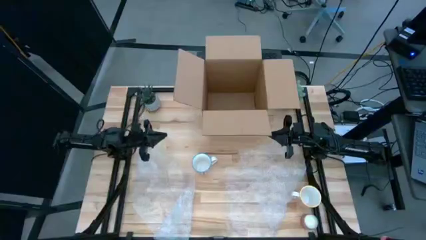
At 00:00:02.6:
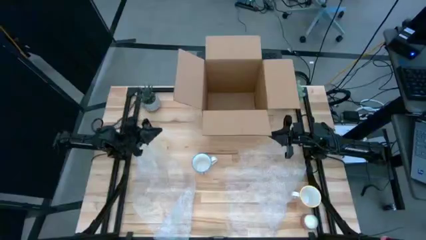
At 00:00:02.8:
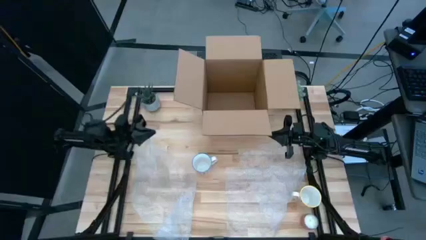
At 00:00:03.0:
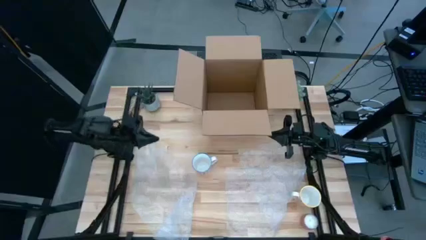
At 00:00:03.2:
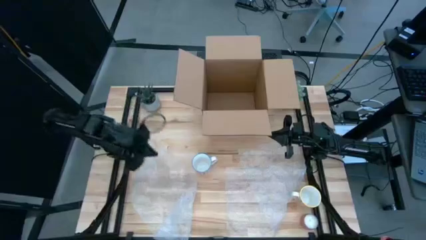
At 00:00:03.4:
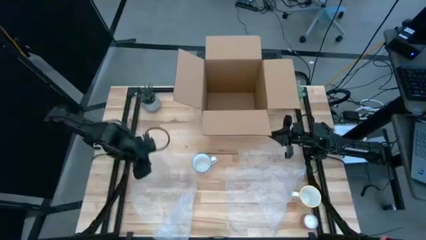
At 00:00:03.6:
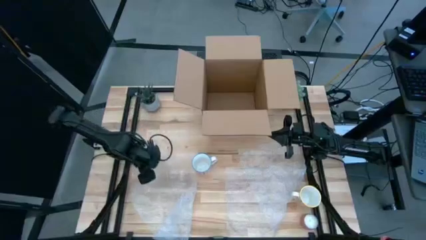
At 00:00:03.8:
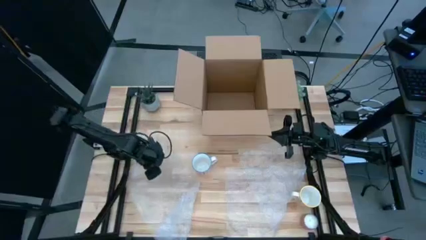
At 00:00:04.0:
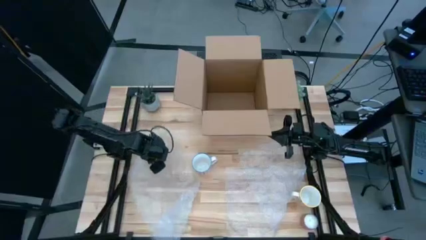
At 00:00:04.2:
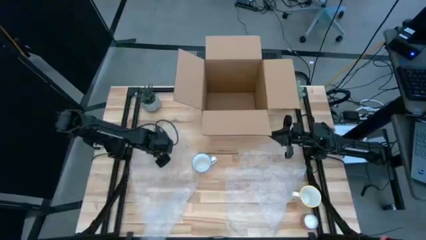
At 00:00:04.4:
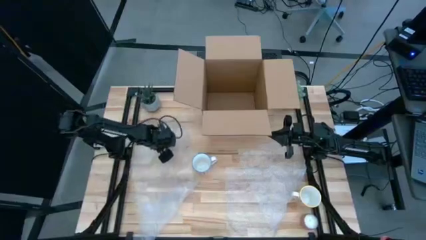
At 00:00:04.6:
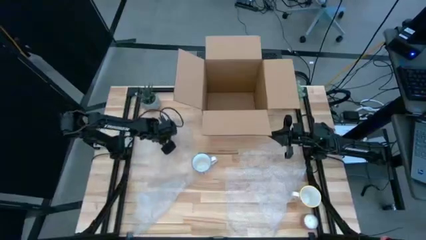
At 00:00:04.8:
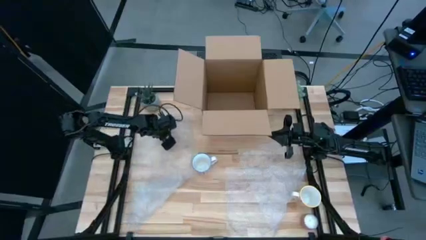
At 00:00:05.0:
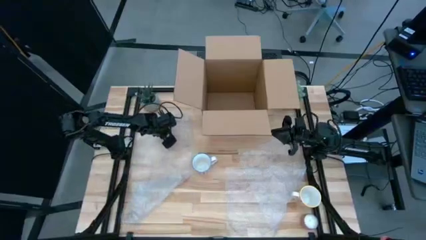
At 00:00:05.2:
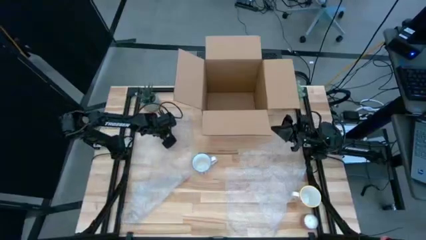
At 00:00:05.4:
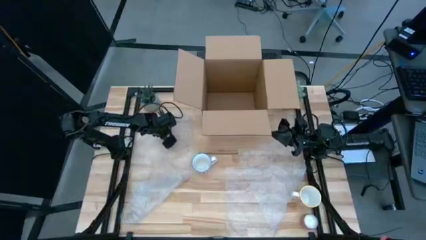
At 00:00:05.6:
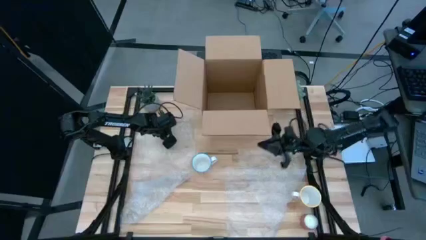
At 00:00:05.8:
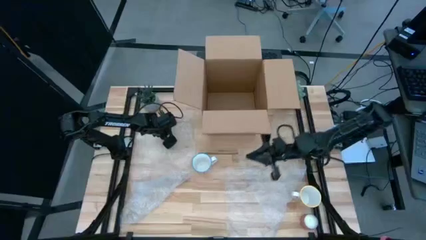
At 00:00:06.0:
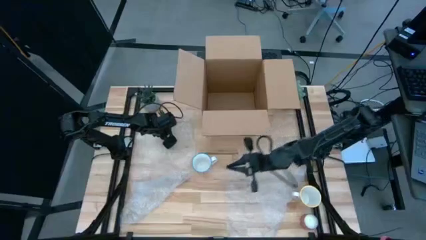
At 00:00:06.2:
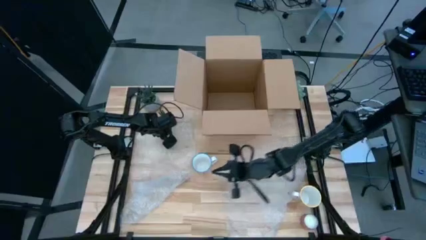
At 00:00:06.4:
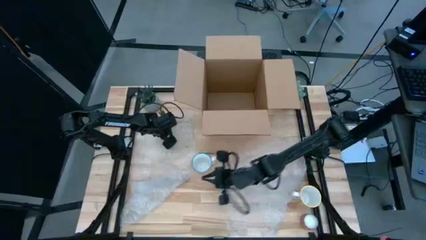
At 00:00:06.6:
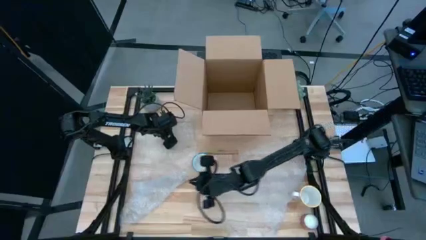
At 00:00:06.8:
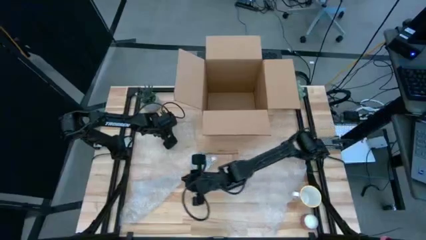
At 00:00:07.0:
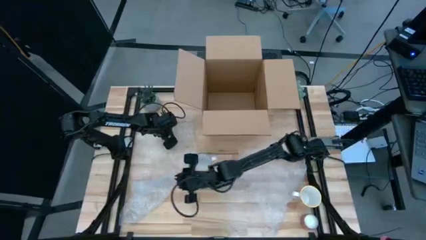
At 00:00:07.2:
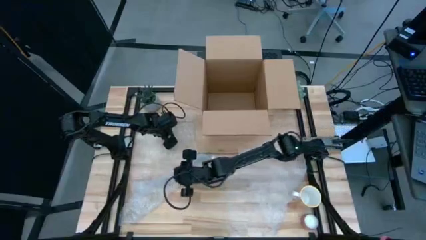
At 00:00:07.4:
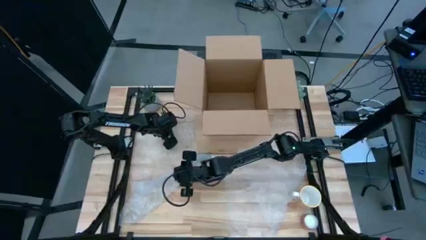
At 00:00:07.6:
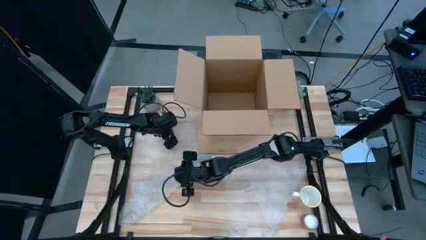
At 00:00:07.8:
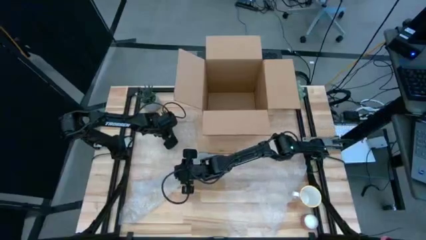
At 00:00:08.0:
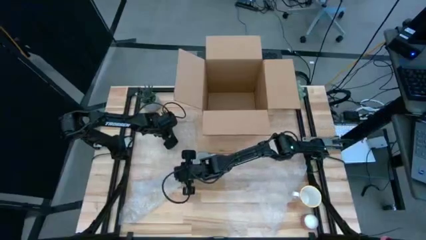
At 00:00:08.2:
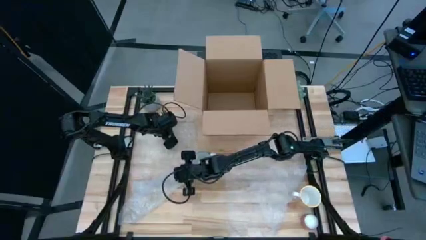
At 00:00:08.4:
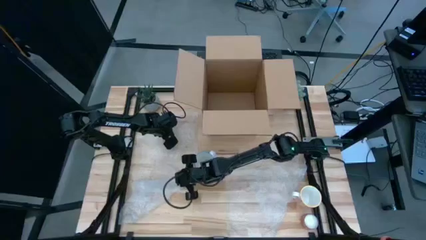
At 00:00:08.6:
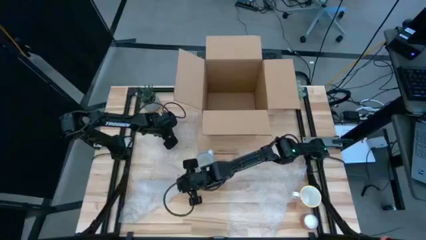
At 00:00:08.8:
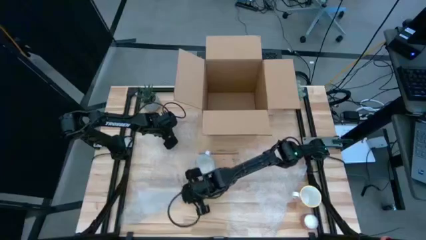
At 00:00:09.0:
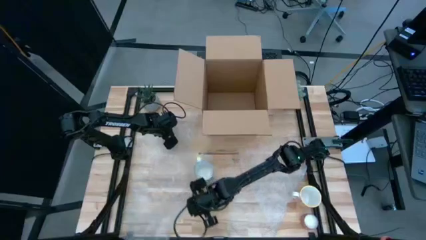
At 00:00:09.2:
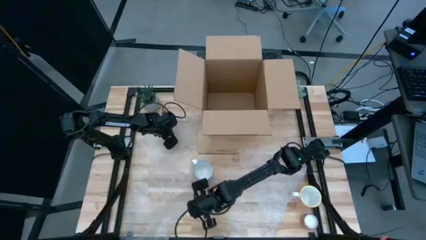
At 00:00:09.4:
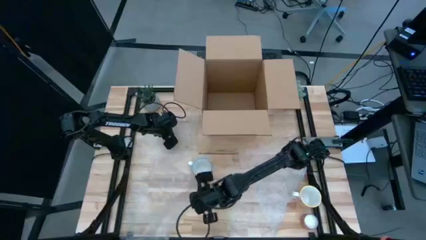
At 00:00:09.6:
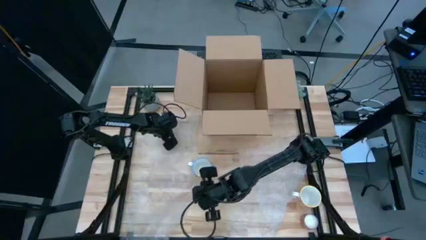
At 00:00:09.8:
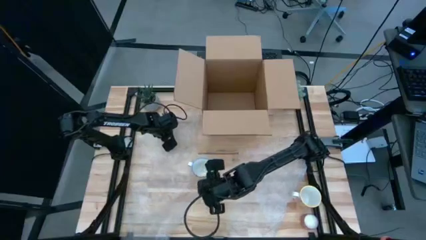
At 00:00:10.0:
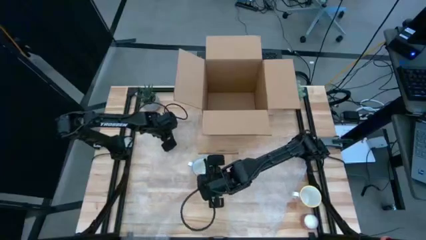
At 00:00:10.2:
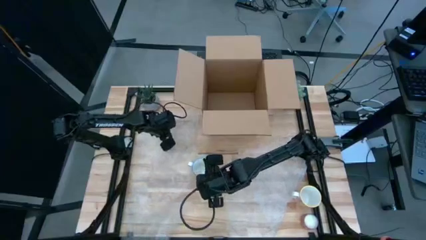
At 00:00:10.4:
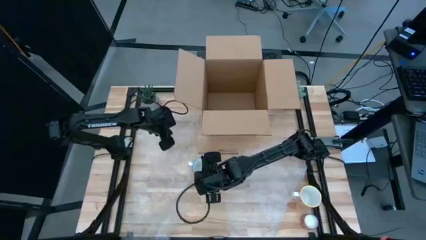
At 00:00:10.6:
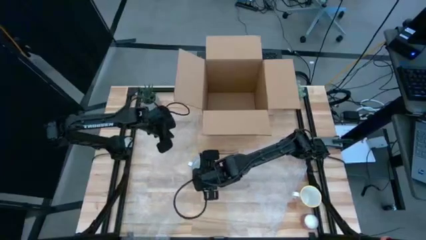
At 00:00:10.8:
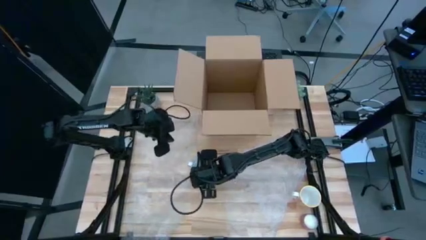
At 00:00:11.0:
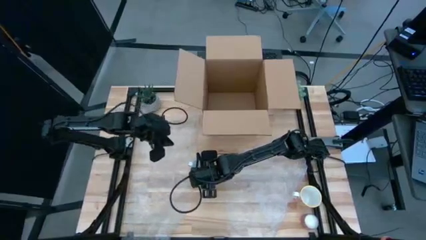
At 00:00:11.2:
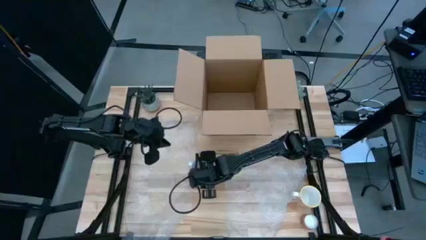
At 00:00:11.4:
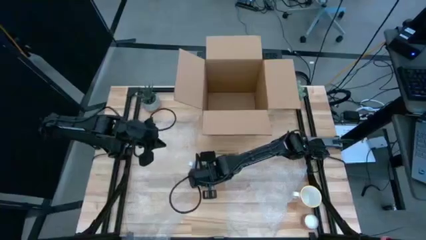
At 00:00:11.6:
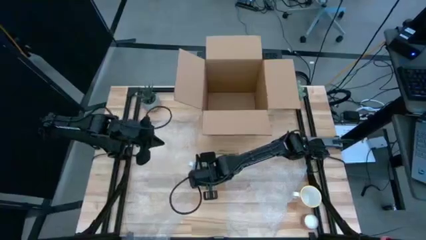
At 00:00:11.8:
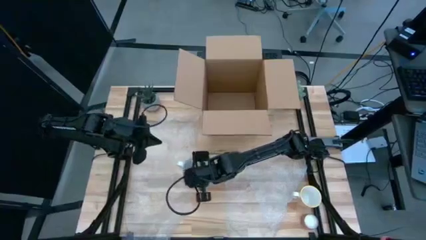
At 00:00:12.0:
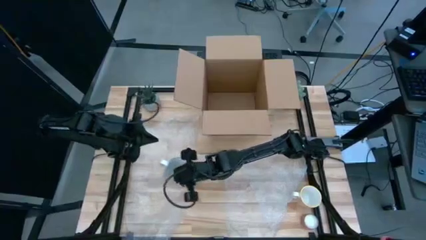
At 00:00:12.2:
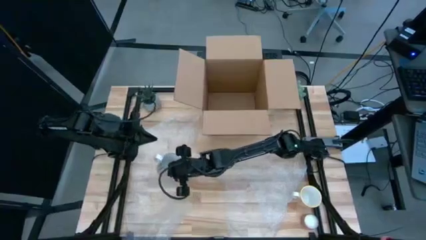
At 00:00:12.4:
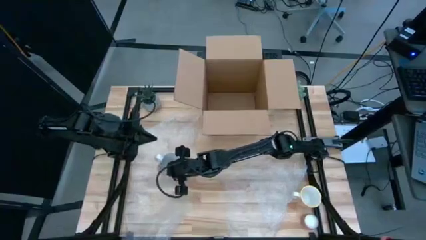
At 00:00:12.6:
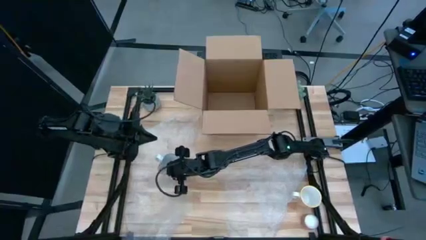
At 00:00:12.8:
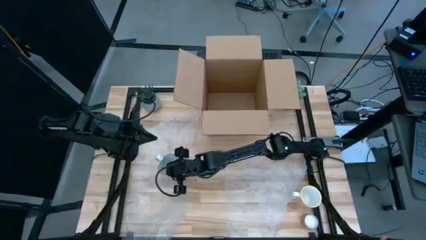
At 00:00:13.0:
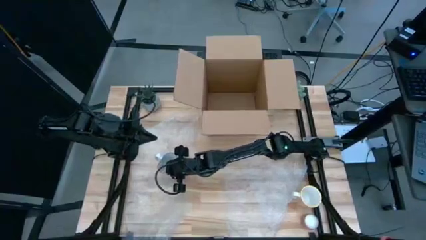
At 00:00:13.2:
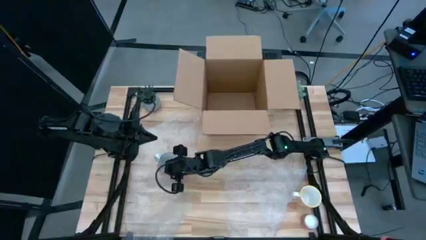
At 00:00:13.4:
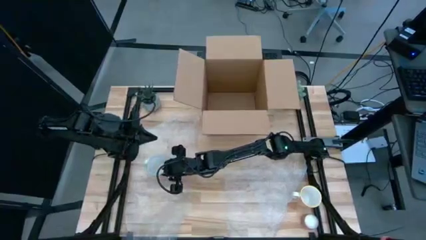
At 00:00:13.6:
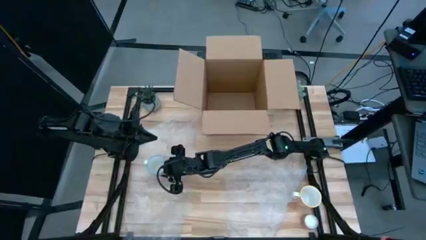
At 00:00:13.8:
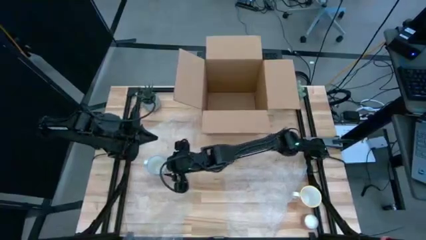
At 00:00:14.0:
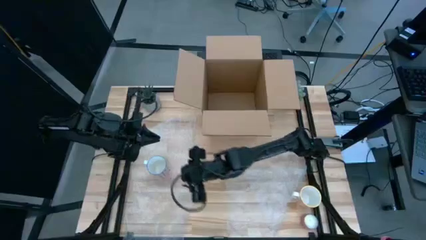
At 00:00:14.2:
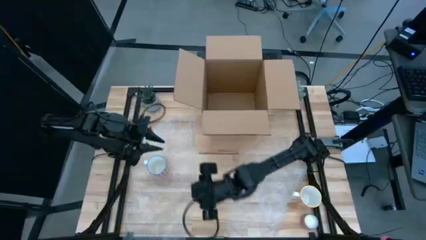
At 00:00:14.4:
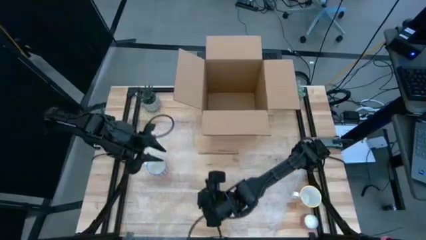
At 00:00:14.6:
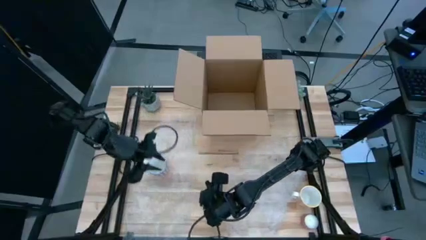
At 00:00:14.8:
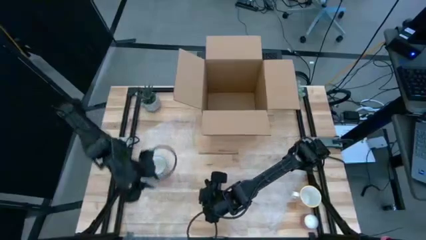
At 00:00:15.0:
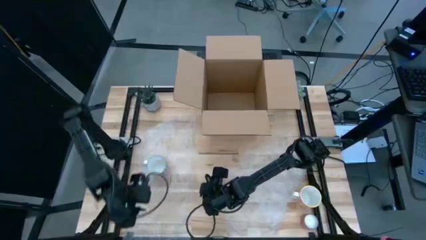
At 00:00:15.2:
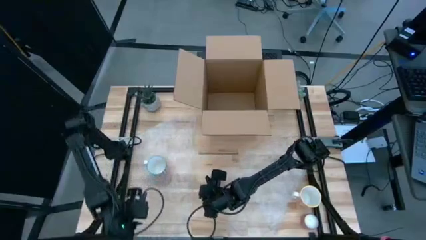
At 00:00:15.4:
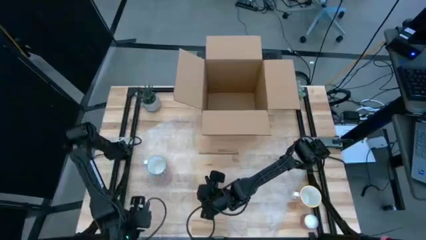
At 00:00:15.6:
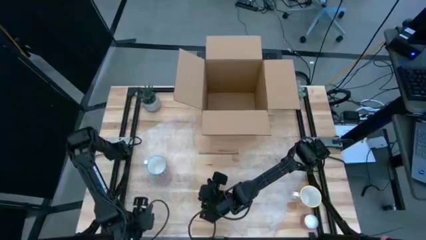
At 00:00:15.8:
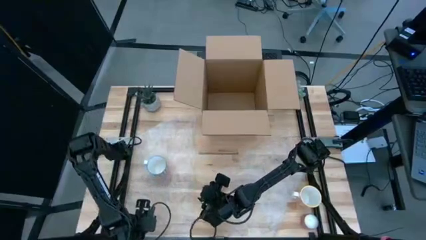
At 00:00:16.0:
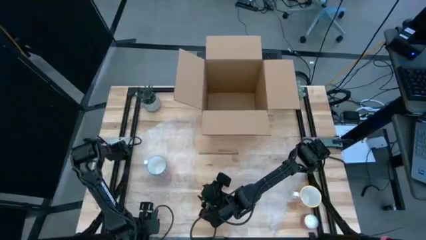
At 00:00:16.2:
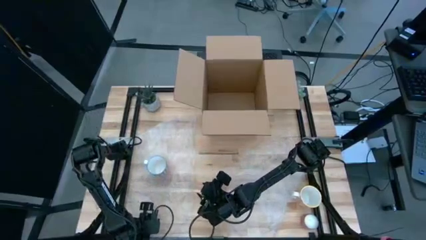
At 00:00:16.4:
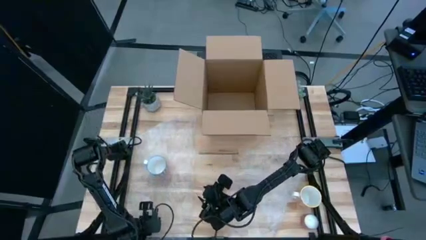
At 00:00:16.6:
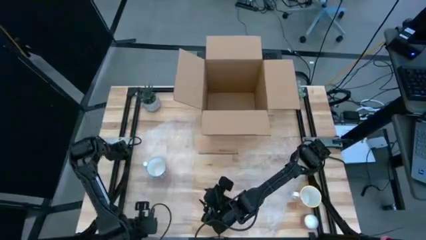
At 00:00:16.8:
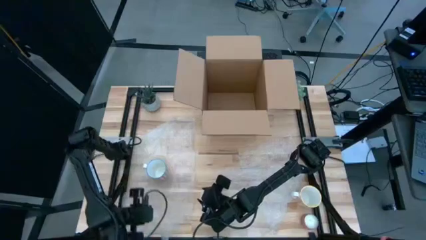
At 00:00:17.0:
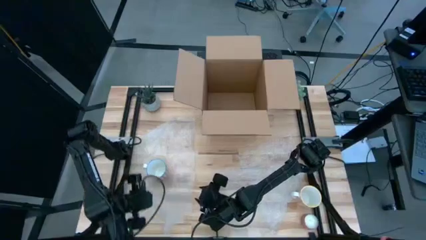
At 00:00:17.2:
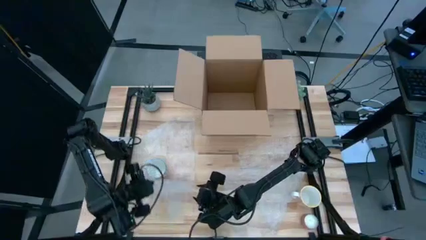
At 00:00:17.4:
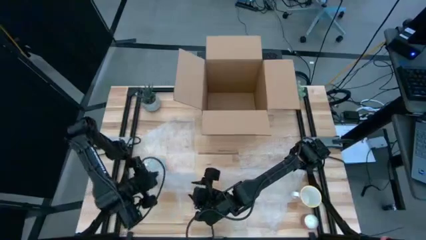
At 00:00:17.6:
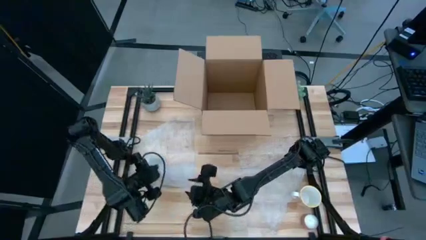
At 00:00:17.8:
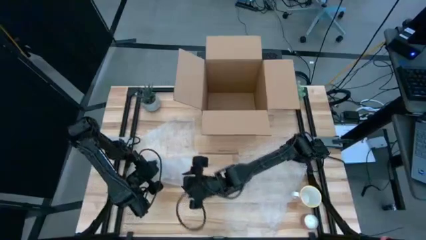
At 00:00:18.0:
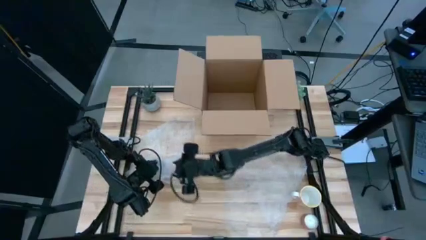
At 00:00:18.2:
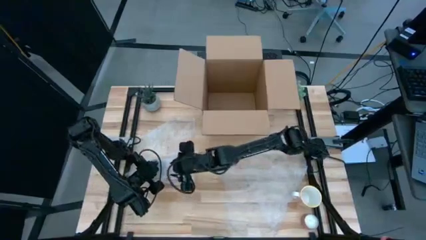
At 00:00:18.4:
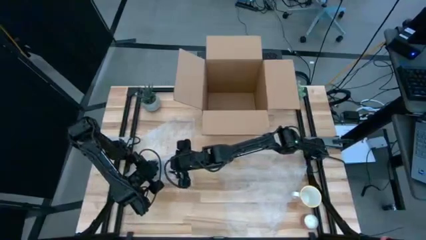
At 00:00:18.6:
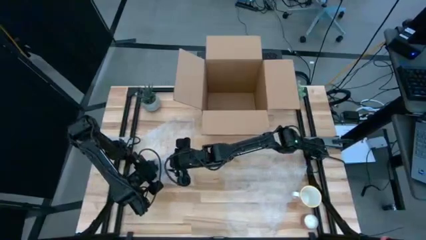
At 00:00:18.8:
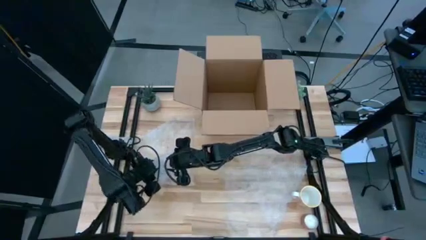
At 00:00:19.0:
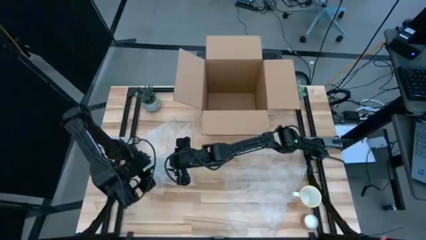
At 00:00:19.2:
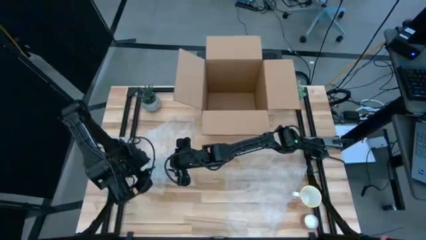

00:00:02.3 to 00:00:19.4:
Task: wrap mug
Wrap the red patterned mug with the left transparent bubble wrap
